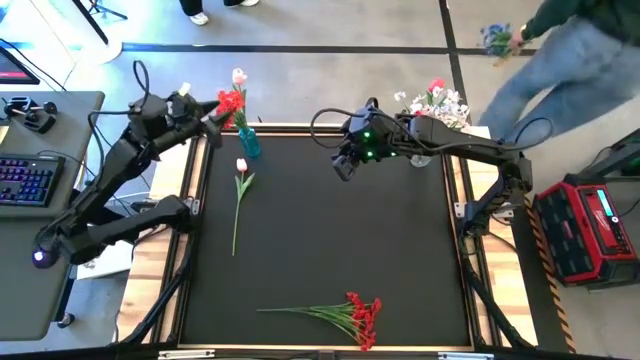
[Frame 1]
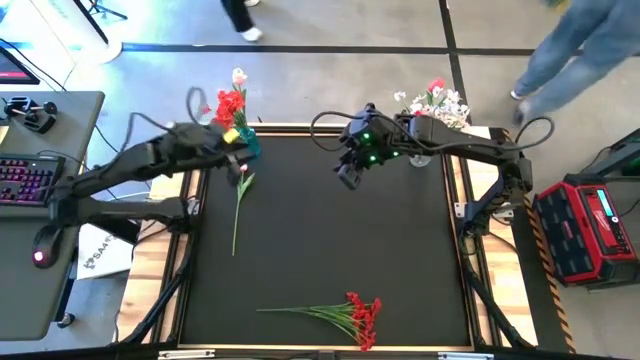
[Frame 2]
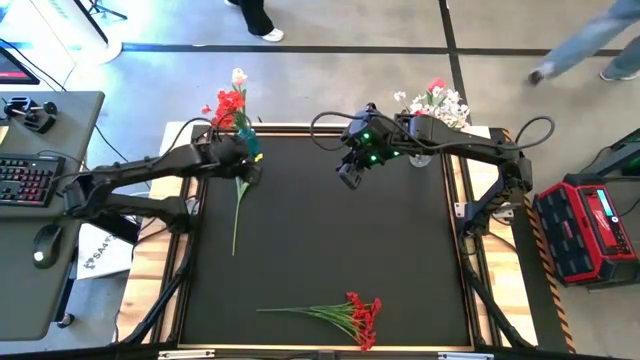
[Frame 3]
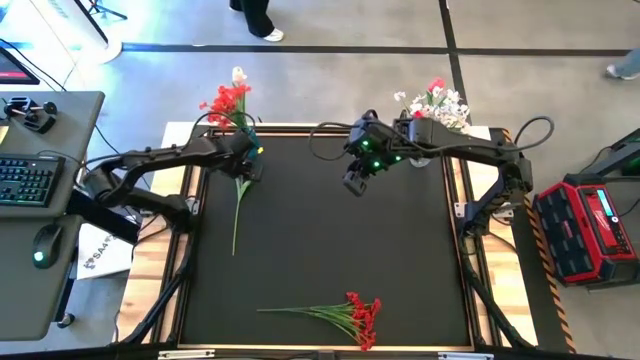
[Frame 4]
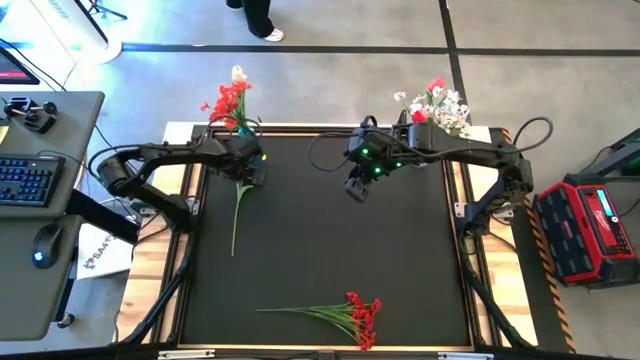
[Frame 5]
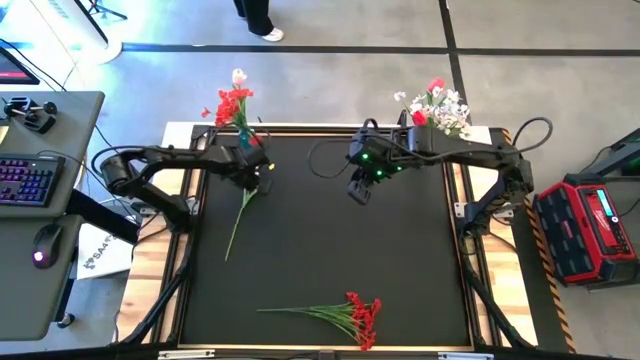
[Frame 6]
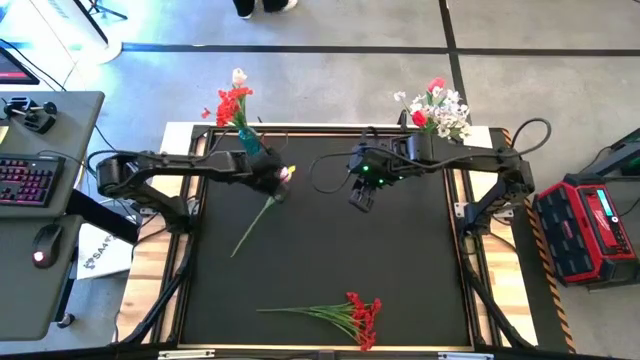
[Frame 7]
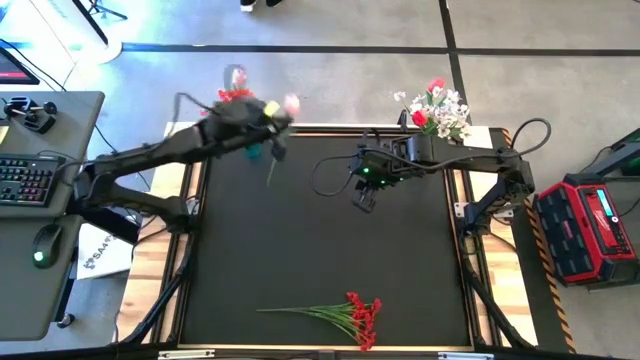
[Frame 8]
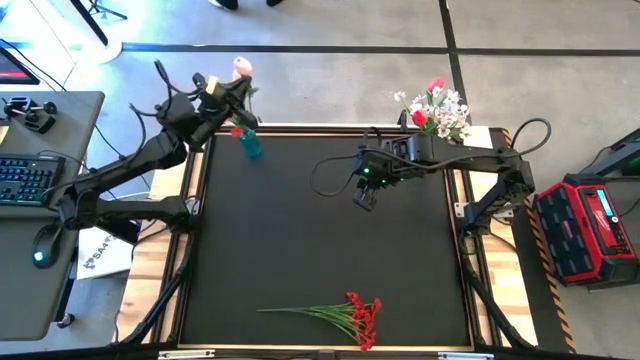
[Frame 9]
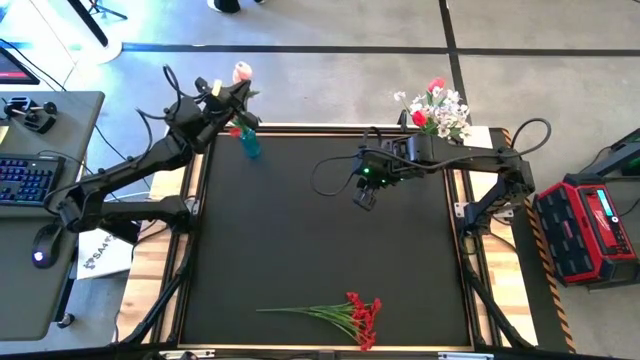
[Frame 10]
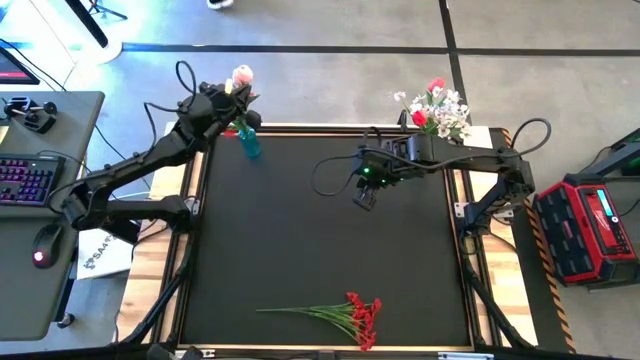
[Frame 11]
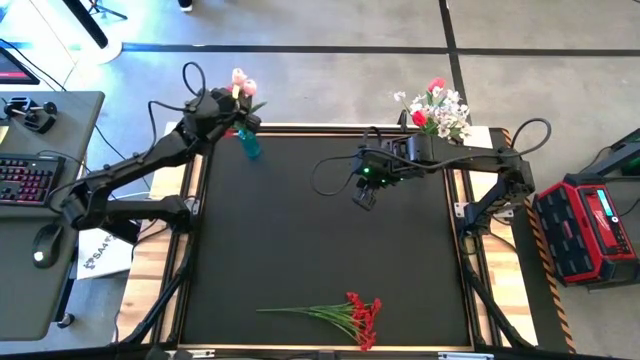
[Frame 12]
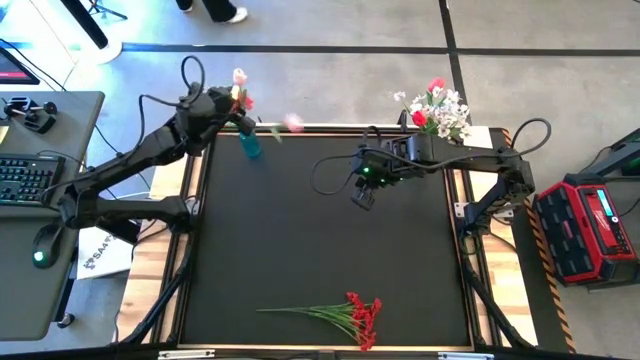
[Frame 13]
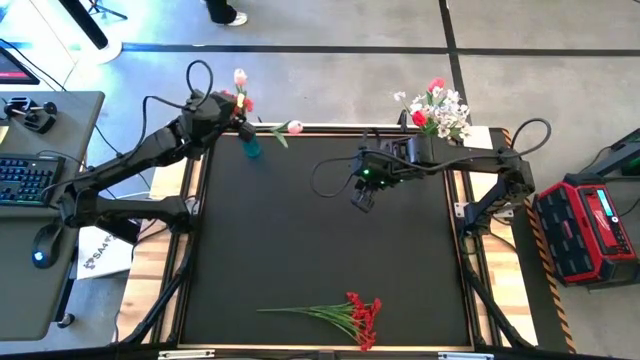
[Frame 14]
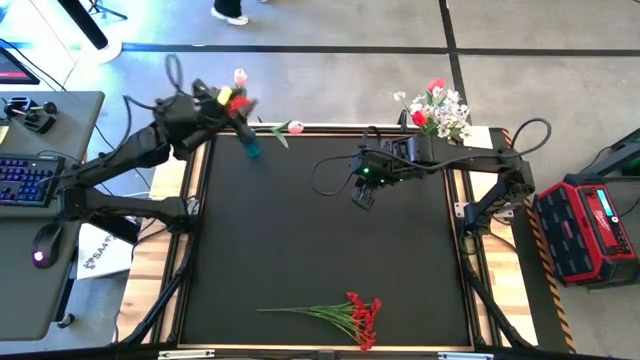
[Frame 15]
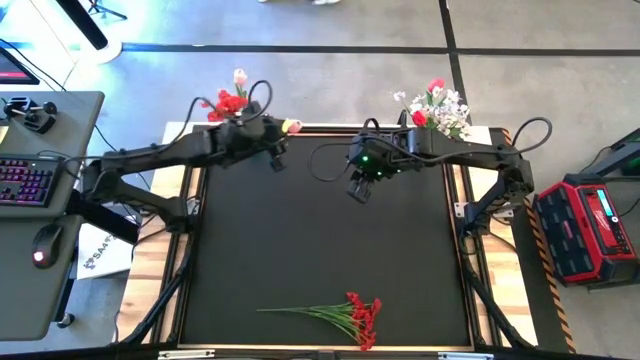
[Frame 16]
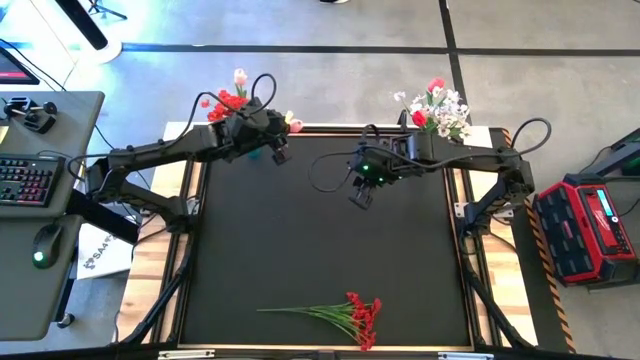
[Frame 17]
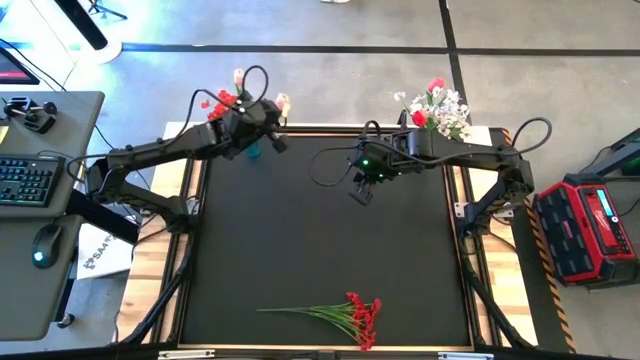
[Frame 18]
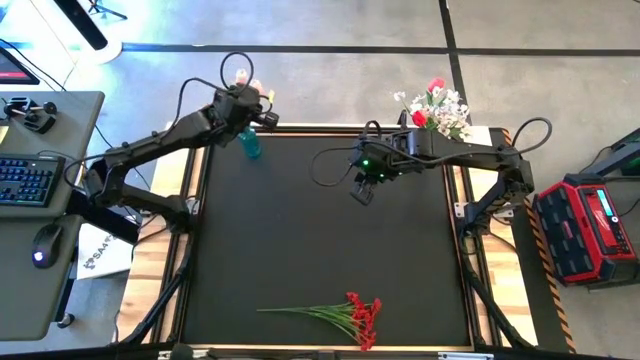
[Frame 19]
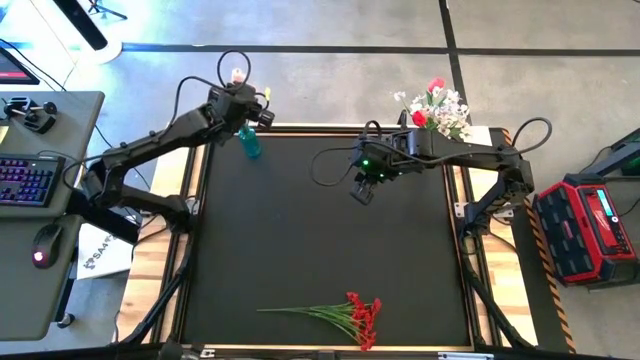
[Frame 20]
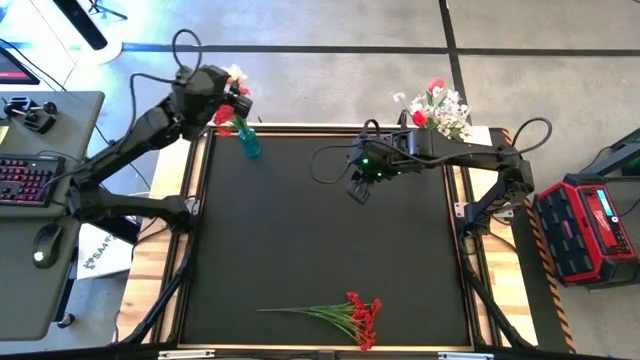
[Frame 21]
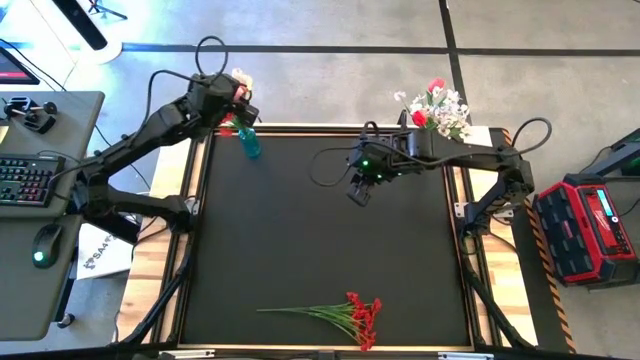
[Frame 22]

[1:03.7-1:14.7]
Task: Sort flowers into vase by color
Put the pink tulip into the blue vase

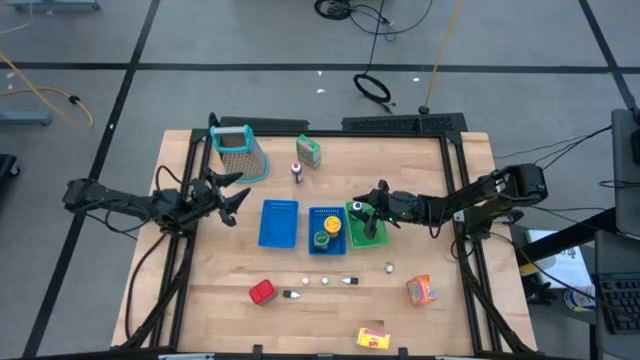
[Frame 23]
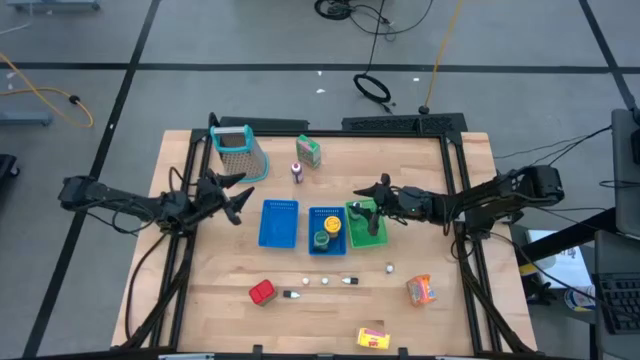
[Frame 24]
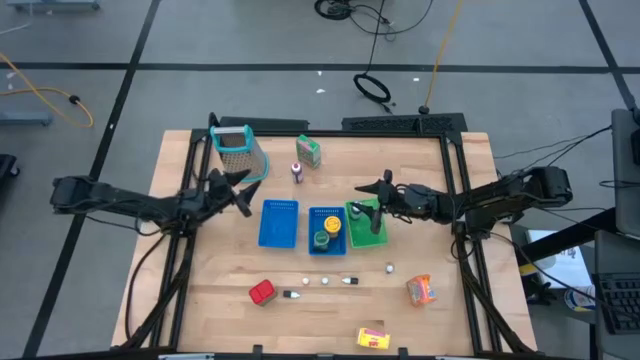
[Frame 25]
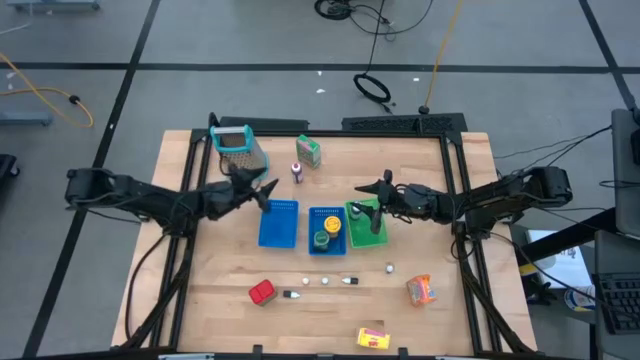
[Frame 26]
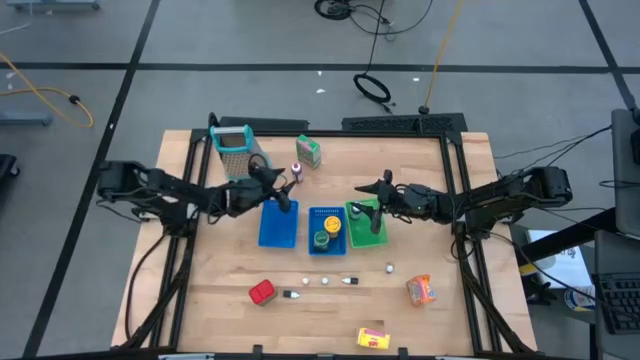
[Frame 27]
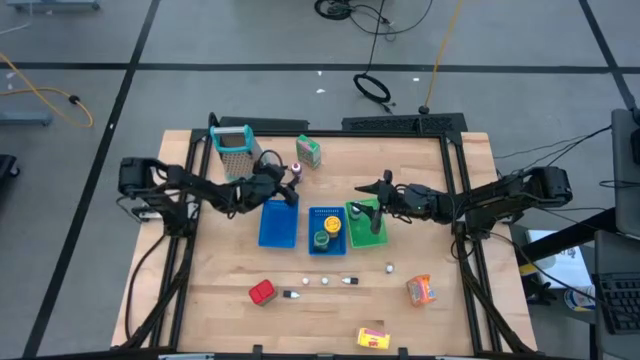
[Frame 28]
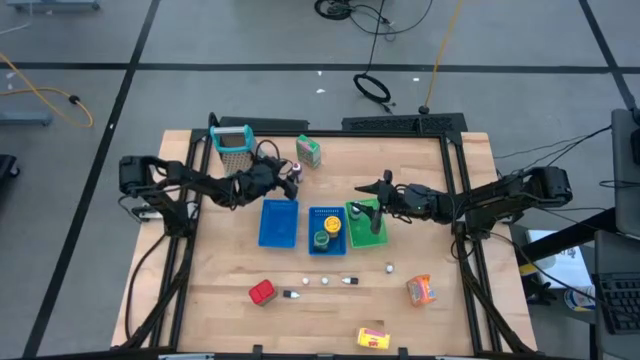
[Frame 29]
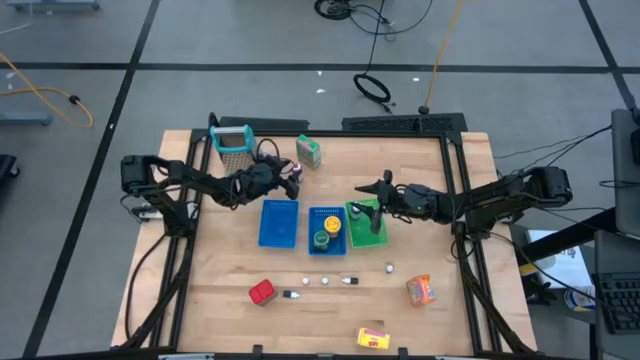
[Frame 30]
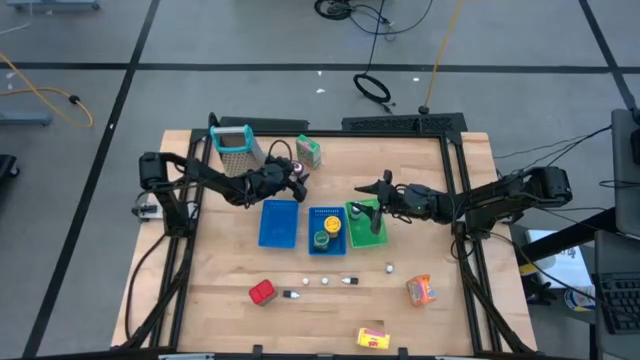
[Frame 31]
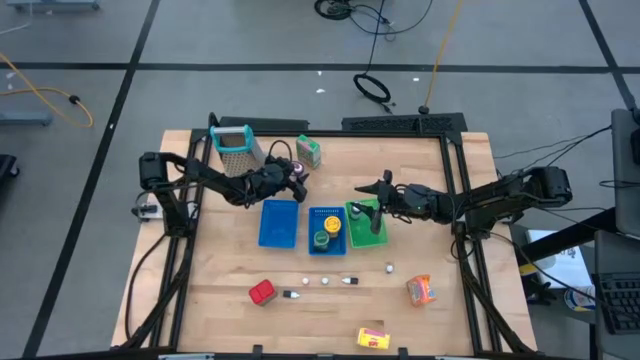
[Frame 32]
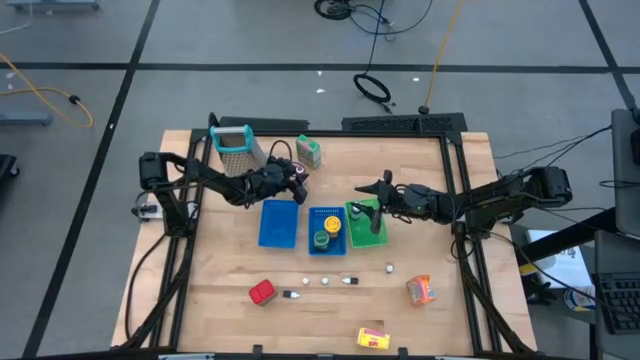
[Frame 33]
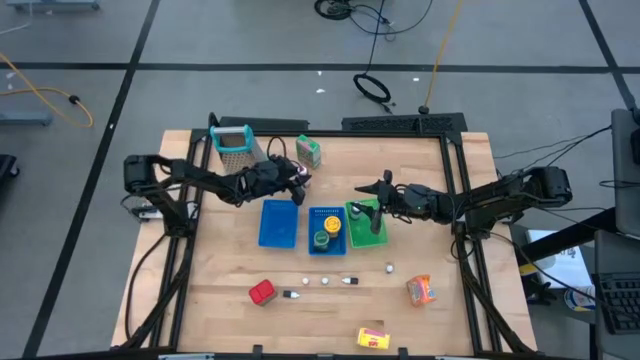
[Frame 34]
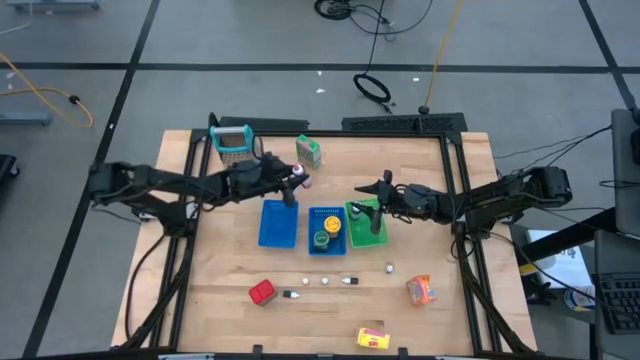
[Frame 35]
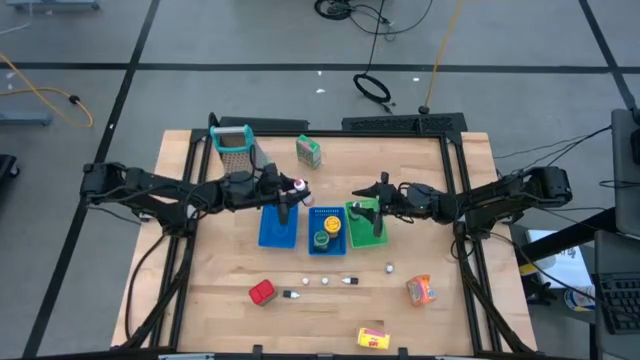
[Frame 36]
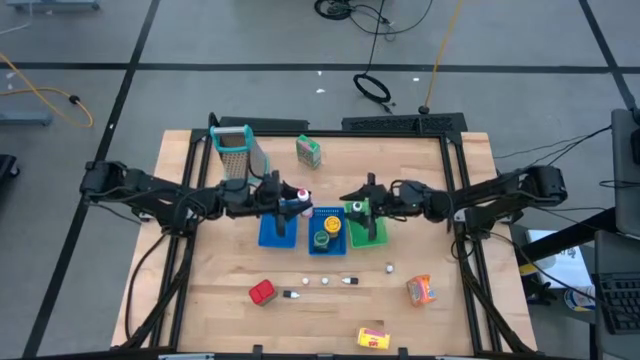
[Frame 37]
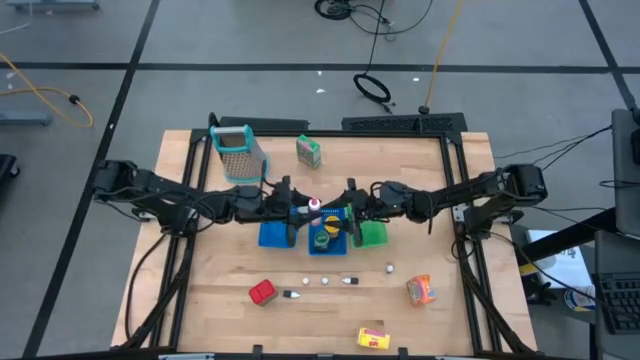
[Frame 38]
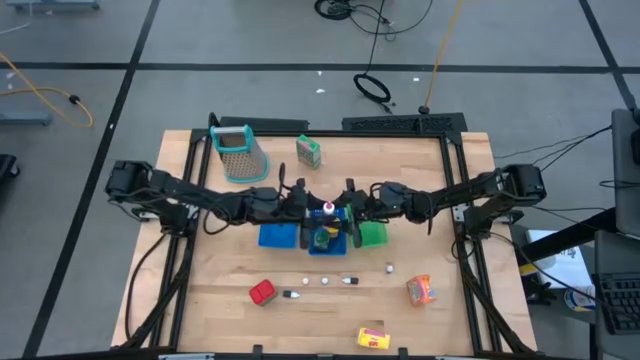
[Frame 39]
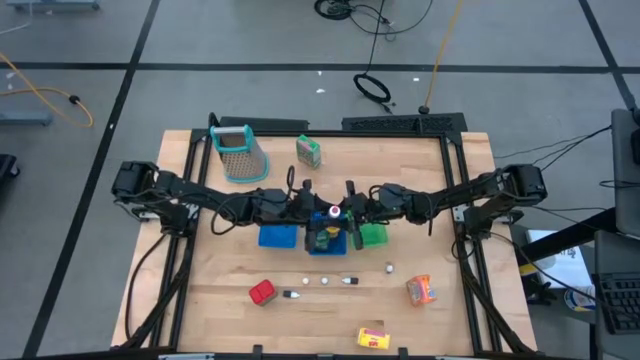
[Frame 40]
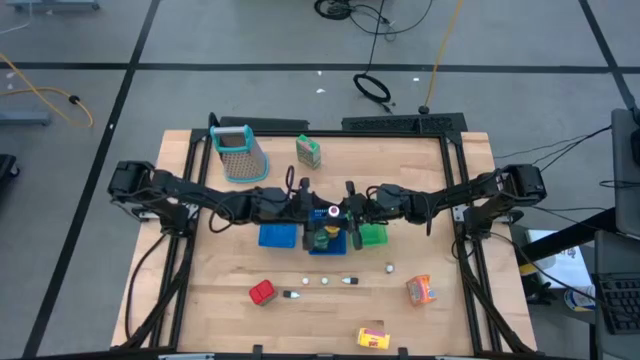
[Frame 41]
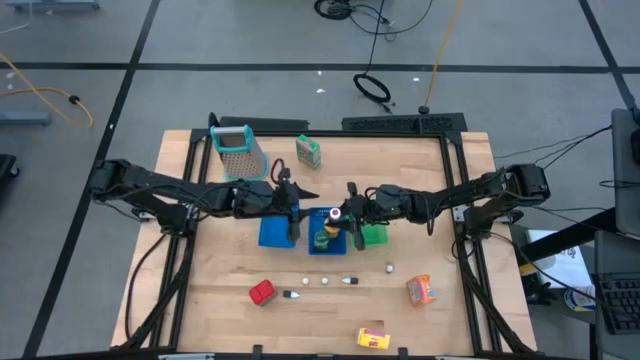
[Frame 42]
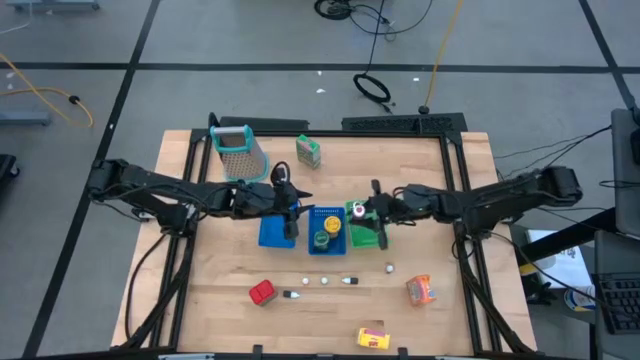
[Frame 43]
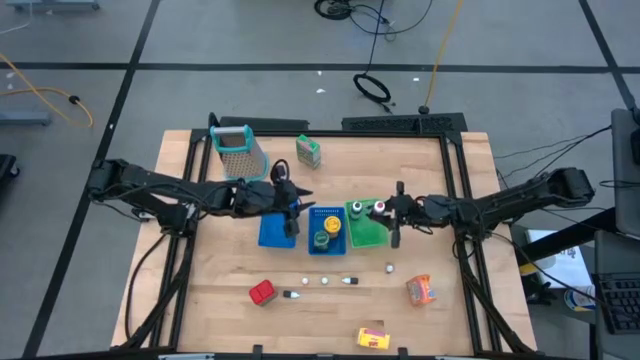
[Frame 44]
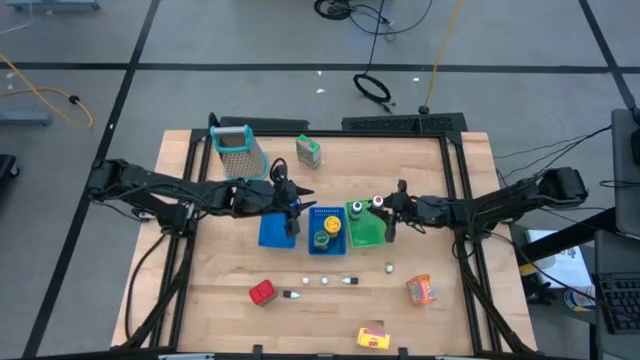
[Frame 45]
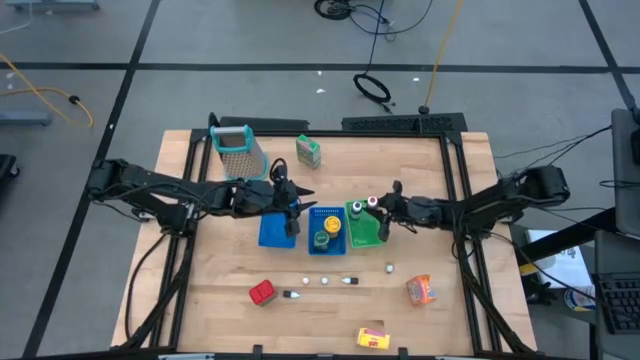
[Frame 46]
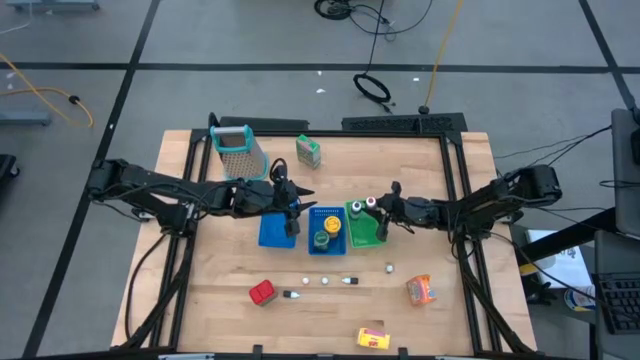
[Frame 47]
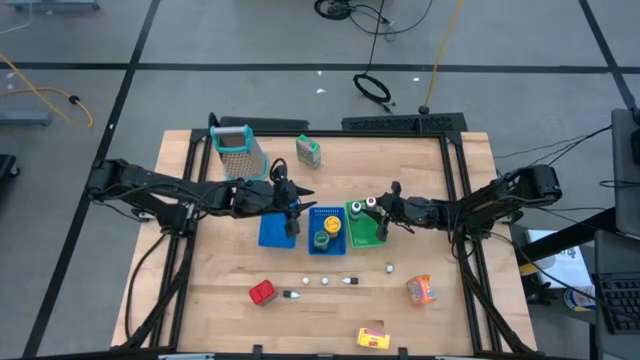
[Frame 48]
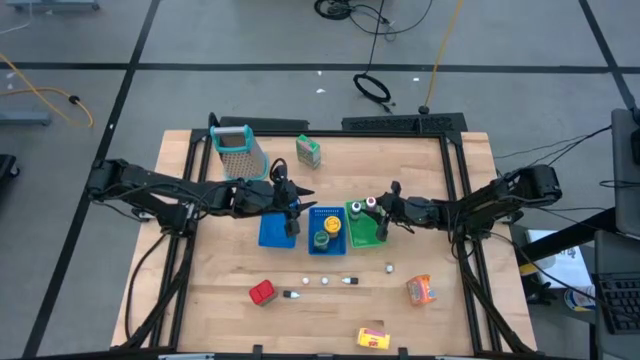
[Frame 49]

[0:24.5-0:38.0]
Task: Pick & Place Kitchen Items
Put the large pink food color into the green bin
